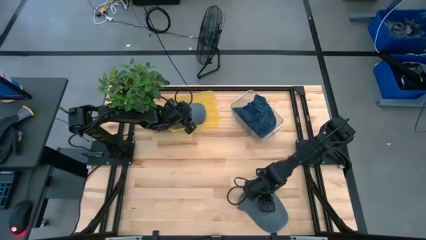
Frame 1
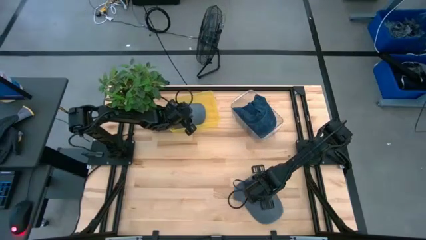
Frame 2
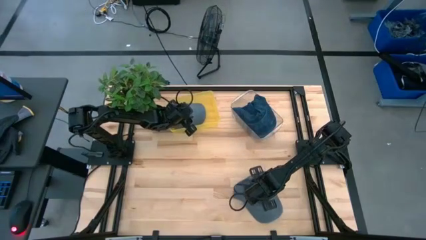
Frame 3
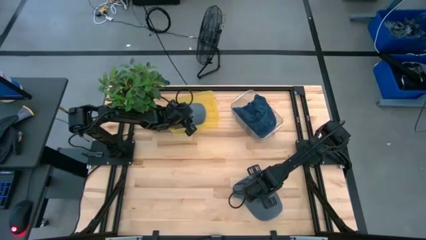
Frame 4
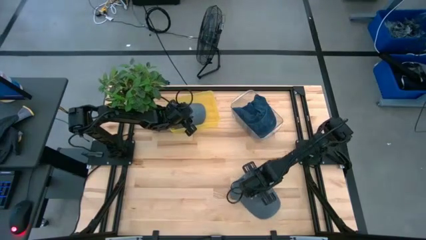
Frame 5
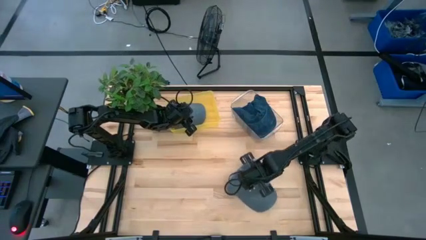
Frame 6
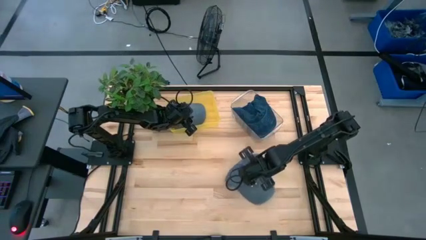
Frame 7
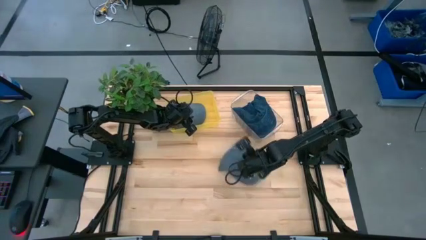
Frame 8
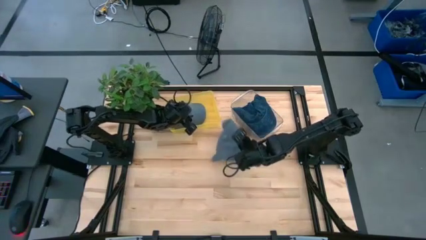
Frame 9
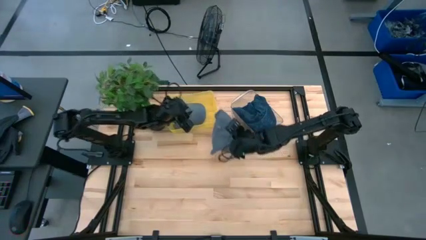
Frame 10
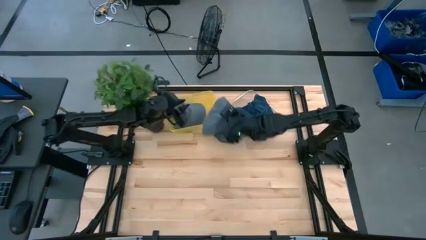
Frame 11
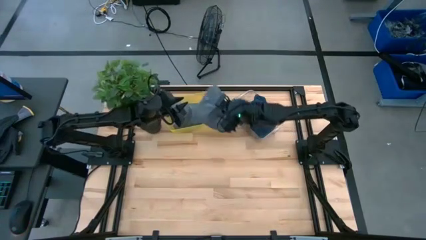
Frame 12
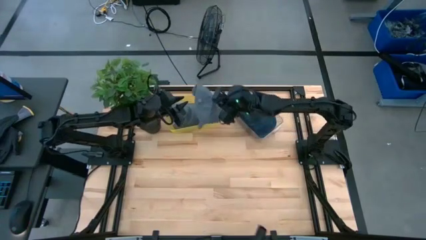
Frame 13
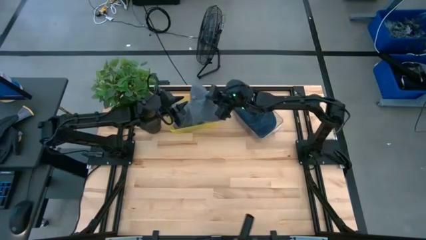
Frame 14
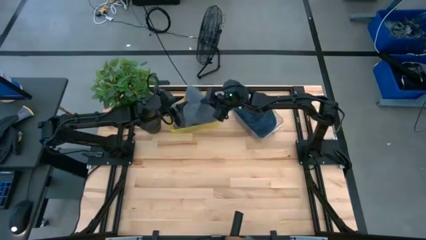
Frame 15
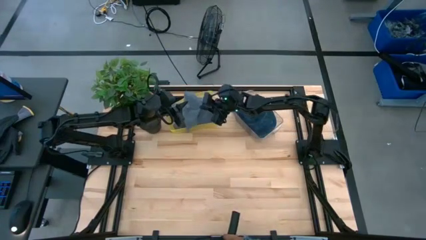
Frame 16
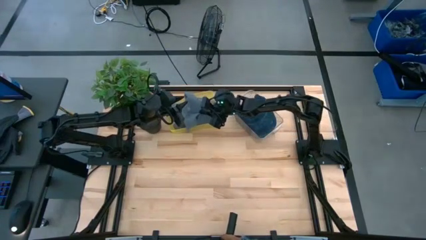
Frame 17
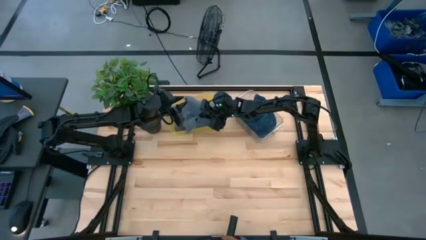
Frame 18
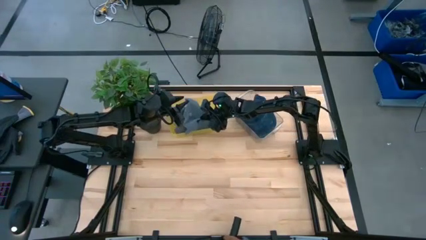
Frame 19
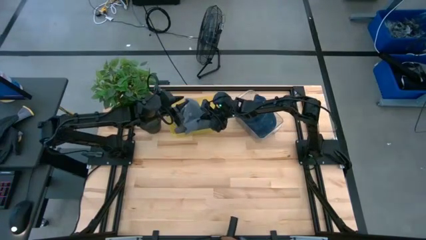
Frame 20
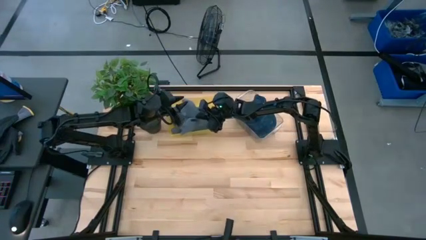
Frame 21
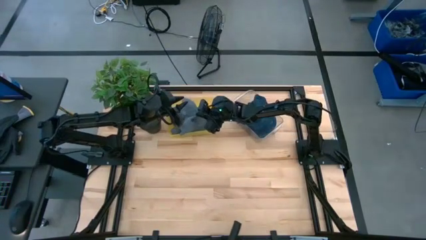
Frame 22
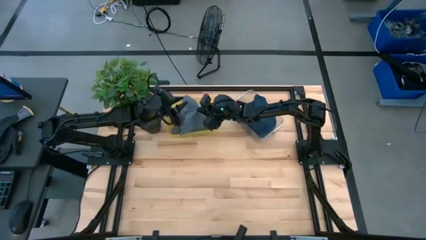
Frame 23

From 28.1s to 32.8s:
Task: Pick & Place hat
Put the gray cap into the yellow bin

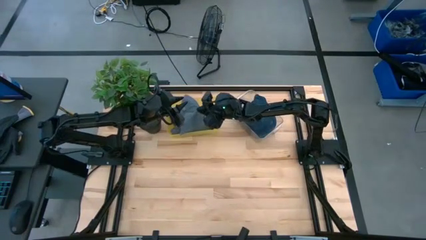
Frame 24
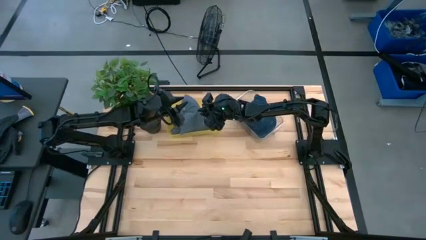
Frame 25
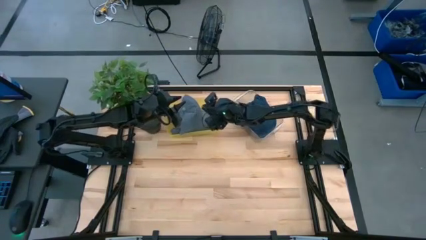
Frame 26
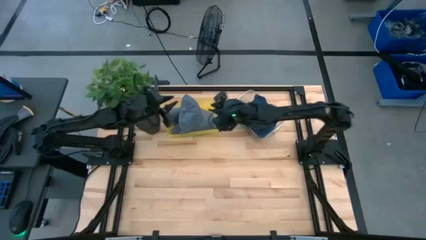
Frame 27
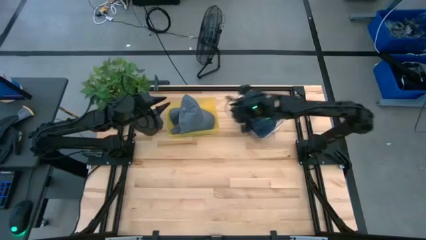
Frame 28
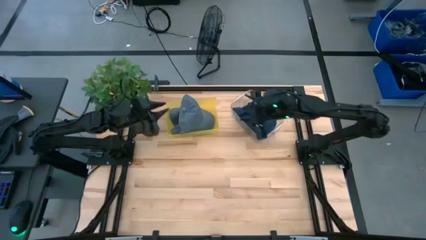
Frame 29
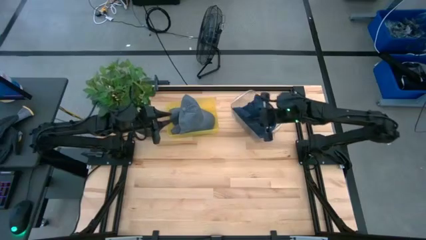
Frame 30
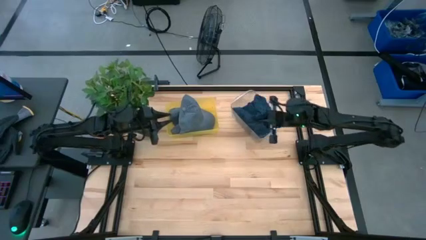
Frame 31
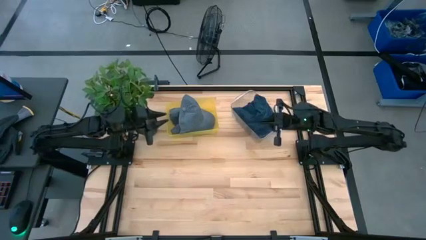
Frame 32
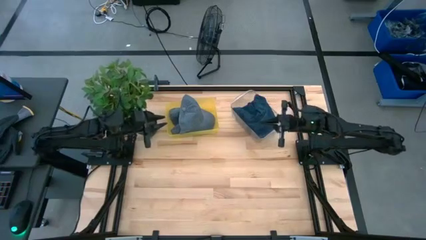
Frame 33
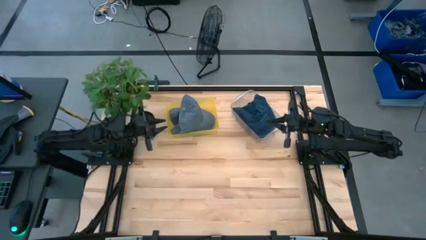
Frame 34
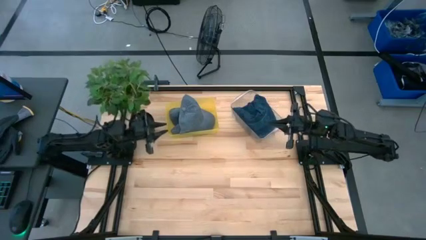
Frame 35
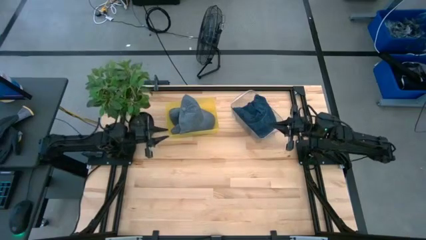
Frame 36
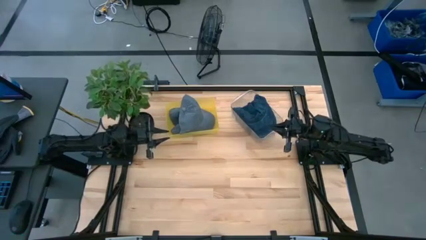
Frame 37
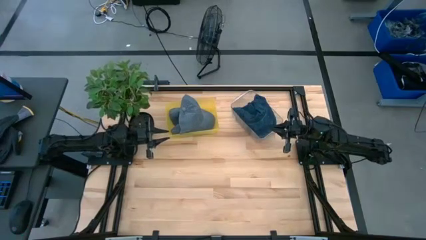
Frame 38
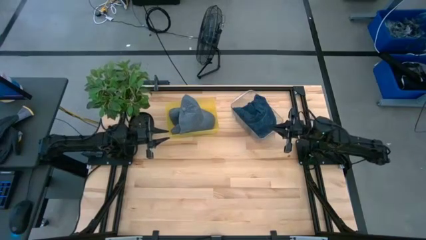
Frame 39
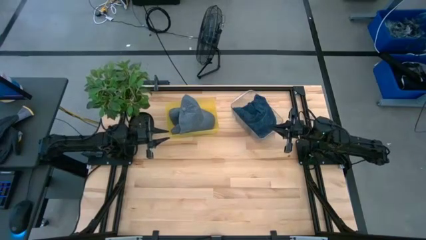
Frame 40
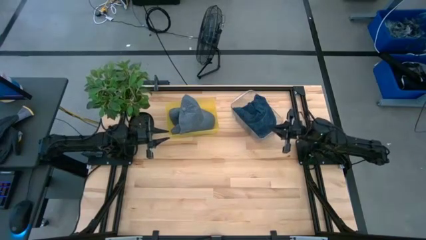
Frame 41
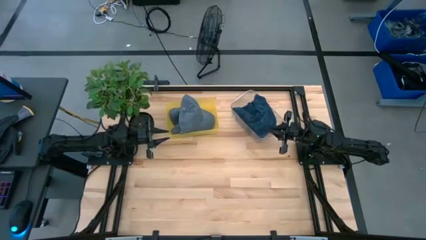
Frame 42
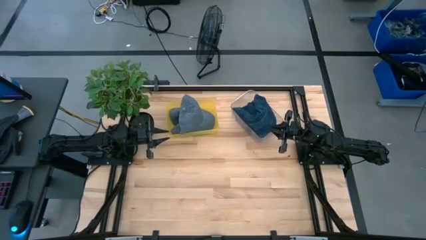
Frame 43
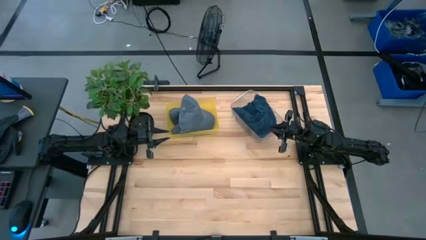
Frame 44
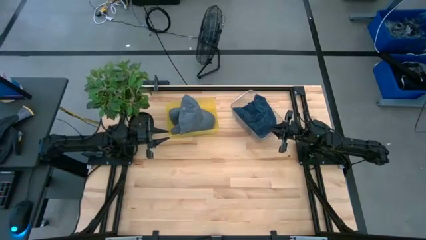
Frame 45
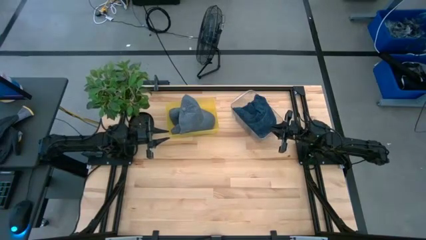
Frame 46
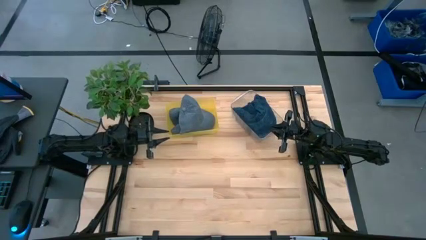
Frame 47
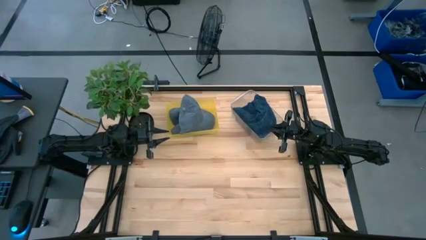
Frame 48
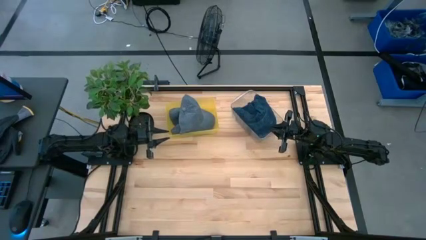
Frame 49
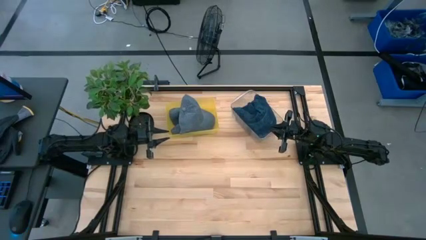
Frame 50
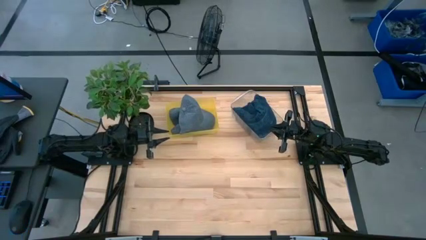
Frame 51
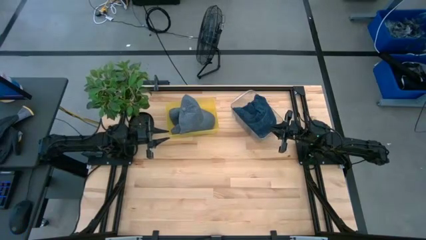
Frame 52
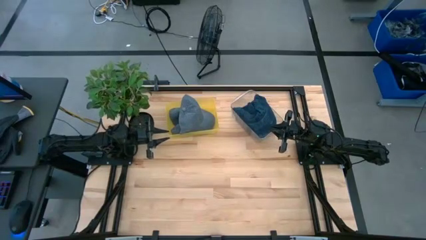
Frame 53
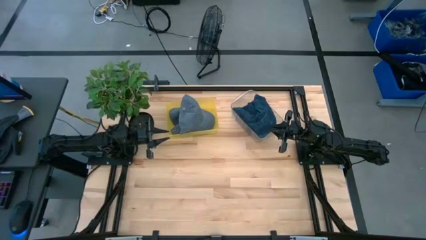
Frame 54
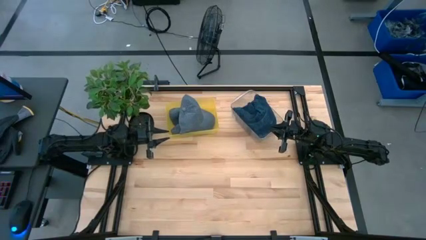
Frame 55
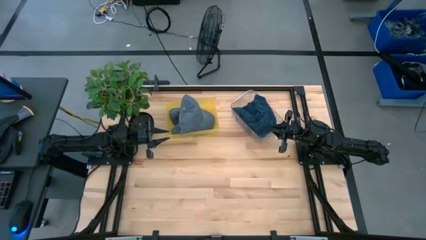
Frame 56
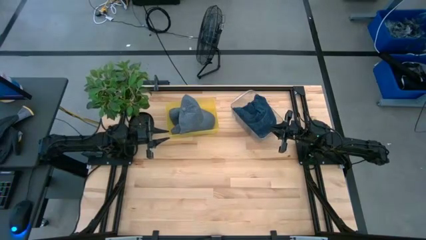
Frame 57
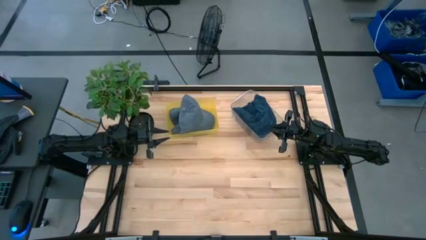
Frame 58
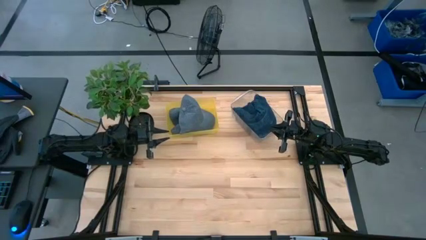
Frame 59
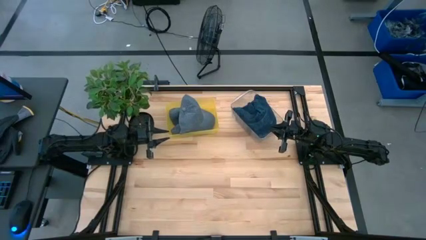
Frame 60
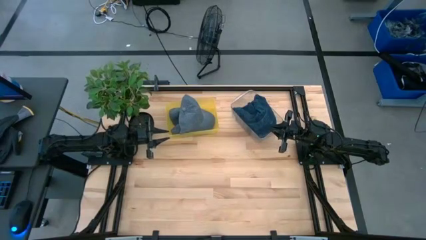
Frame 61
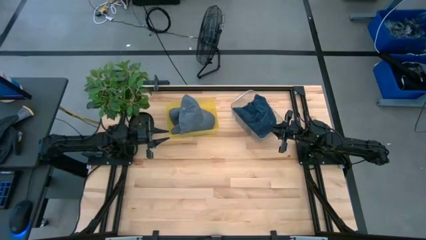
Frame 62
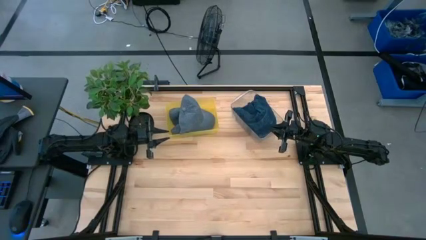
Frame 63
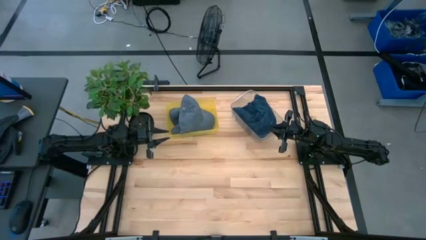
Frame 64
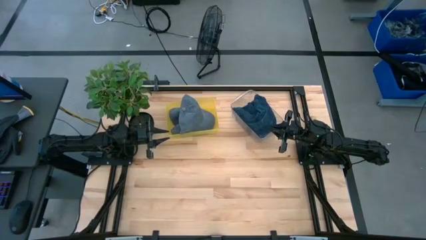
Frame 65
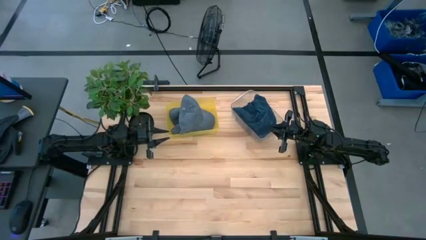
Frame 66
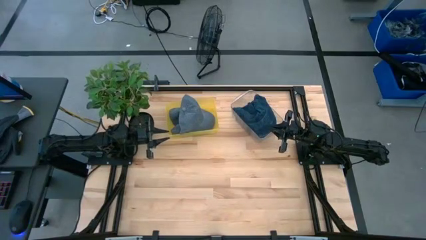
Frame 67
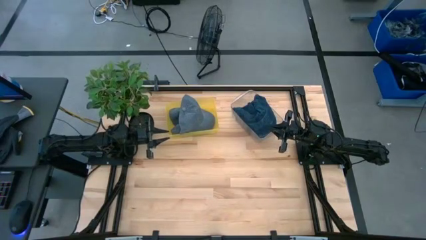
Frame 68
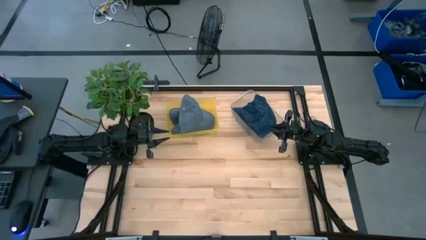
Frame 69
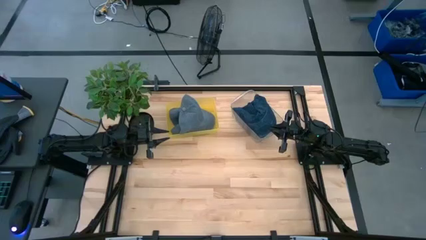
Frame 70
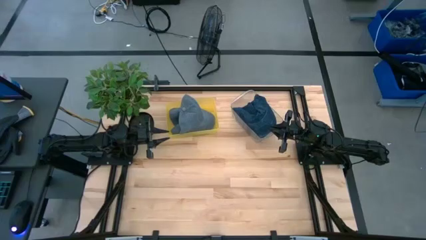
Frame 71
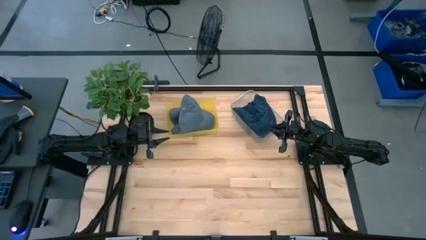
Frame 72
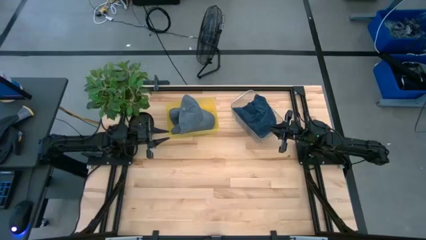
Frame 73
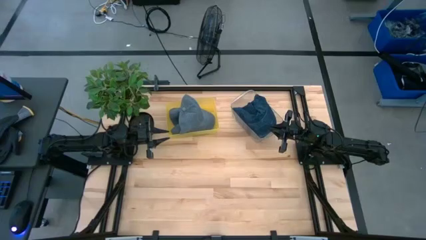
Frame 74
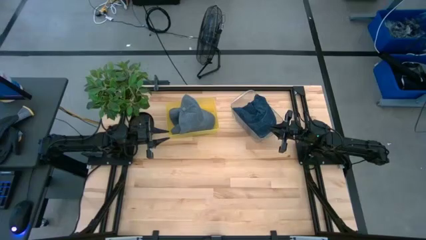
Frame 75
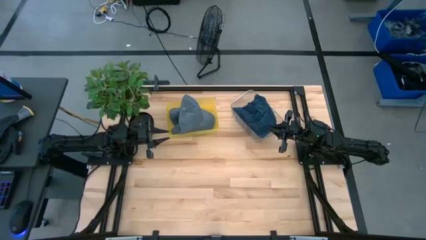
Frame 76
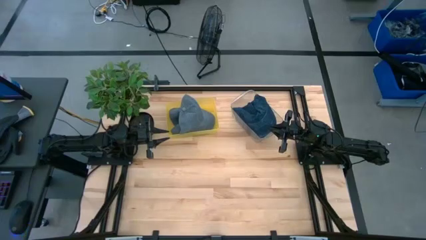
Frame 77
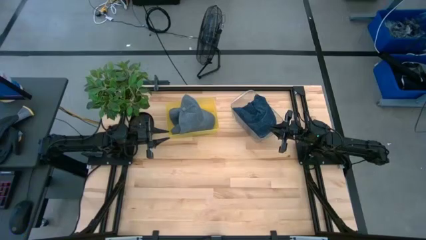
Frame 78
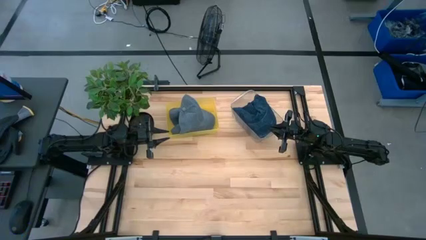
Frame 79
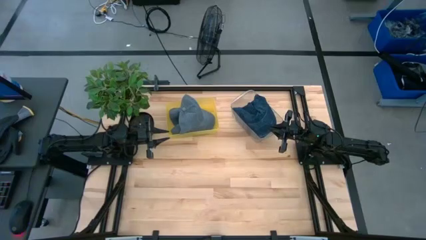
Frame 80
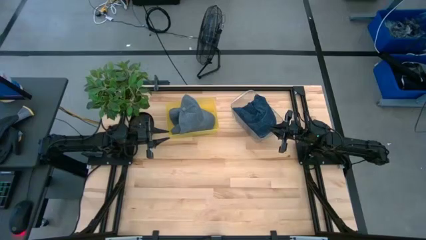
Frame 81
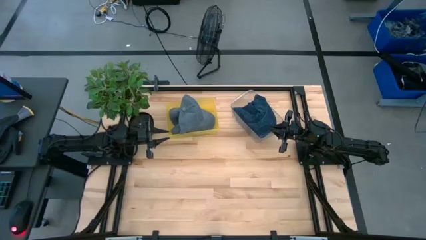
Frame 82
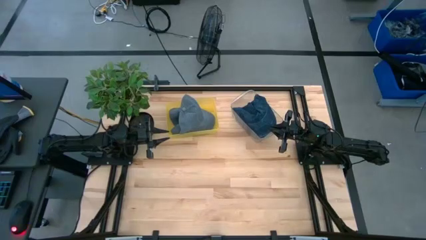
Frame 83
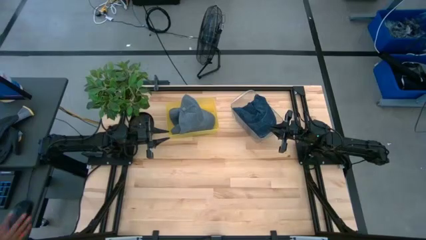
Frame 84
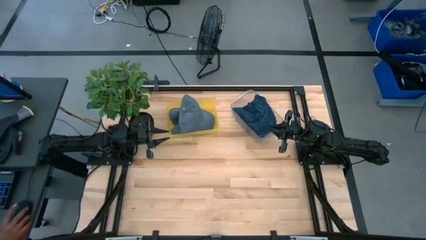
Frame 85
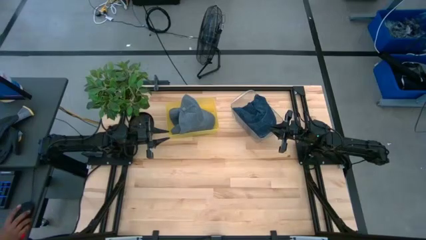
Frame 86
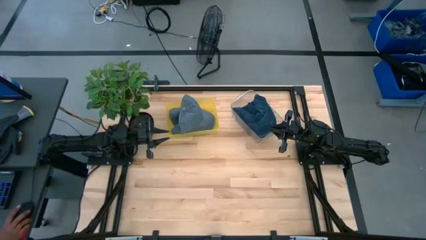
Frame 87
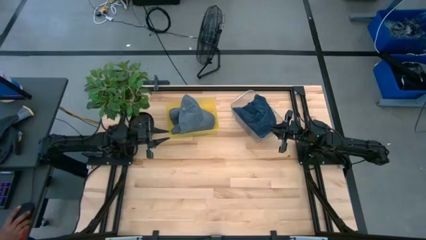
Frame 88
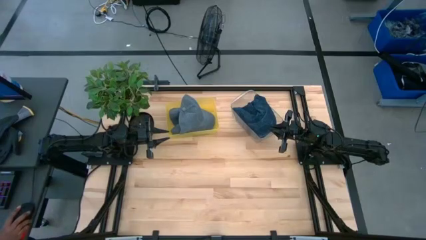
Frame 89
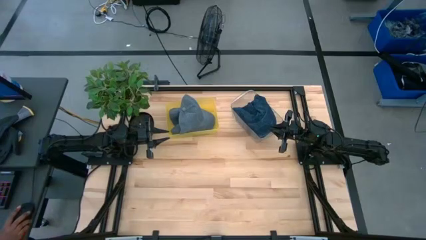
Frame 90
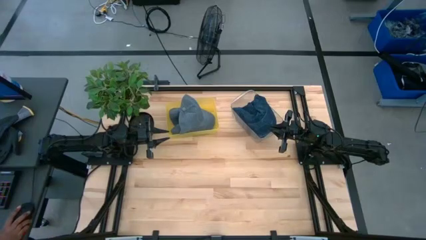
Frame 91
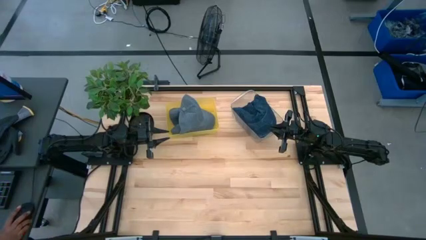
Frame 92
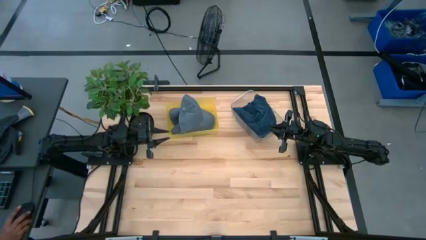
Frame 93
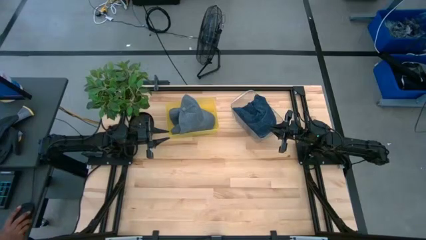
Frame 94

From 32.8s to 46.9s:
Return to Home Position
